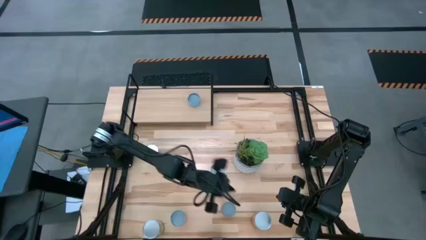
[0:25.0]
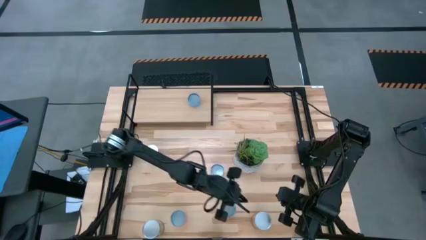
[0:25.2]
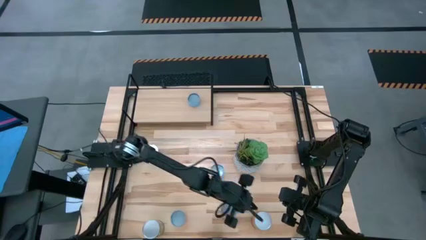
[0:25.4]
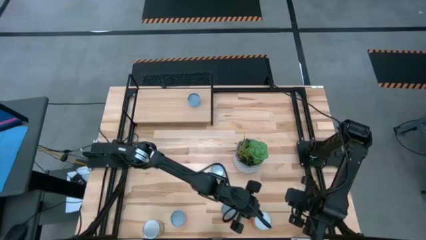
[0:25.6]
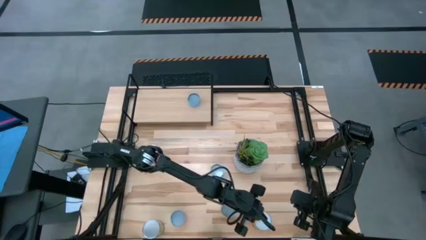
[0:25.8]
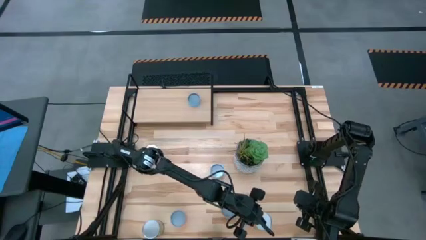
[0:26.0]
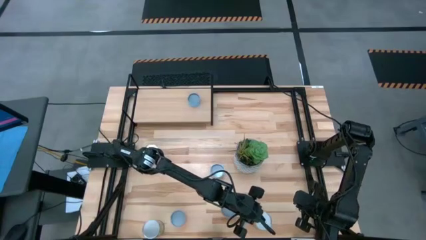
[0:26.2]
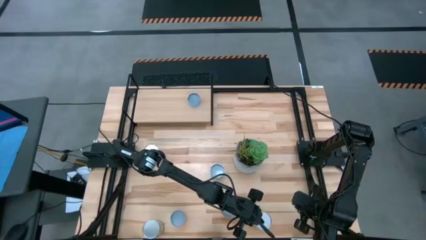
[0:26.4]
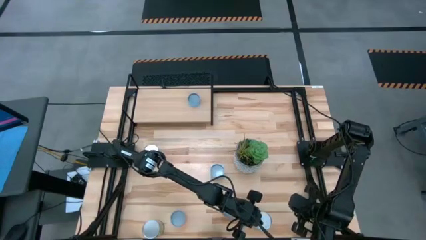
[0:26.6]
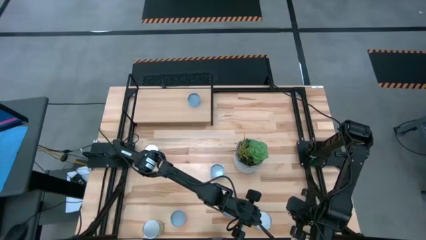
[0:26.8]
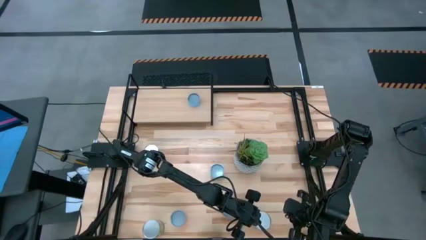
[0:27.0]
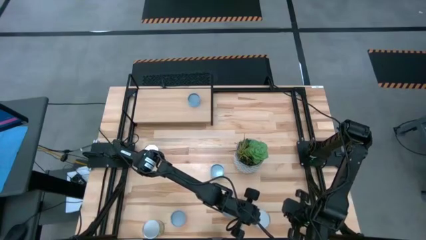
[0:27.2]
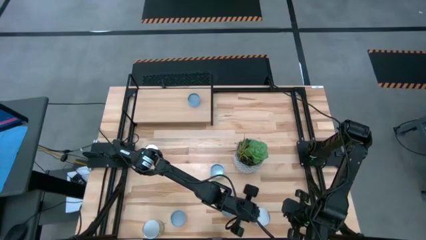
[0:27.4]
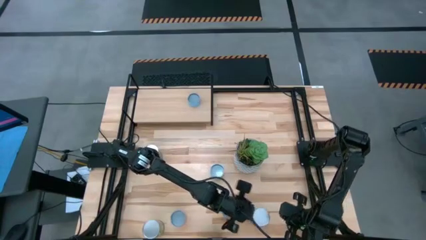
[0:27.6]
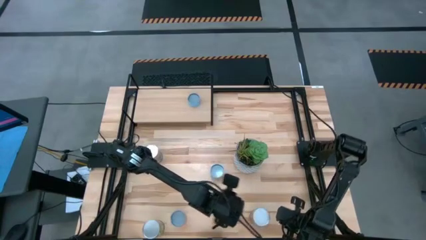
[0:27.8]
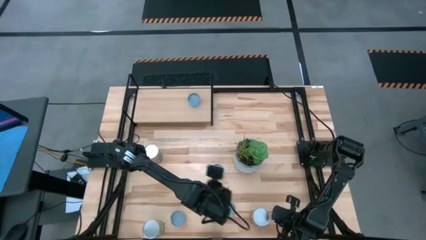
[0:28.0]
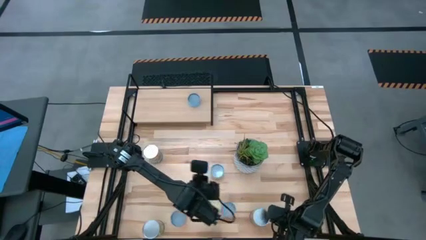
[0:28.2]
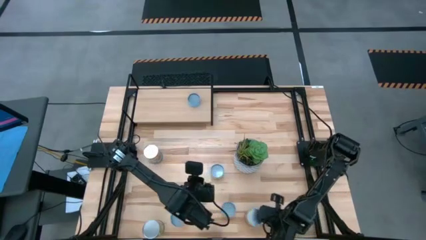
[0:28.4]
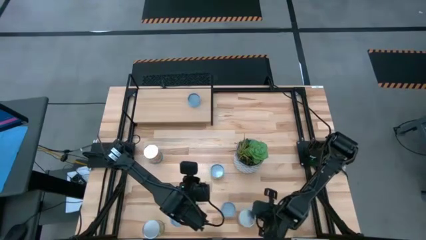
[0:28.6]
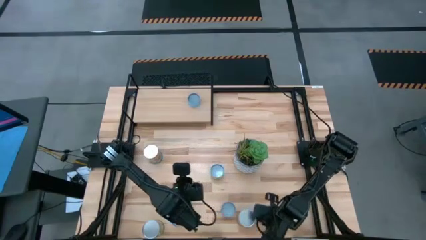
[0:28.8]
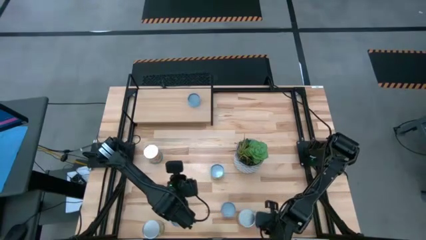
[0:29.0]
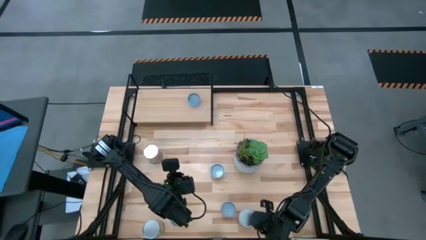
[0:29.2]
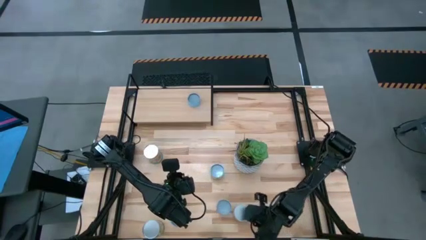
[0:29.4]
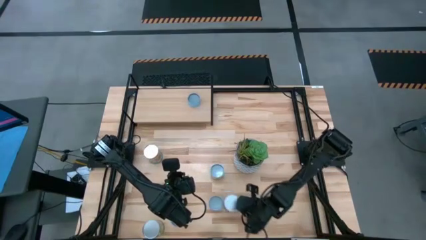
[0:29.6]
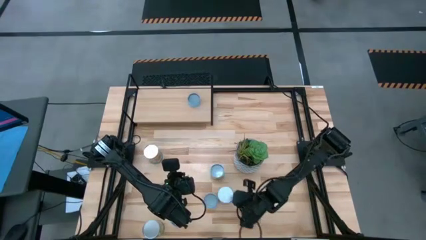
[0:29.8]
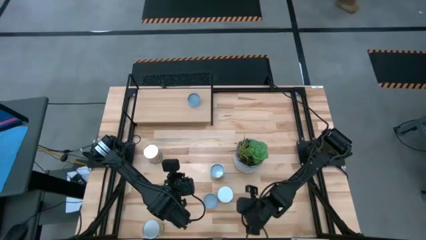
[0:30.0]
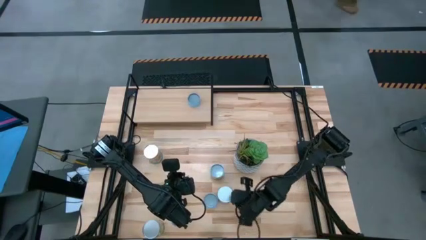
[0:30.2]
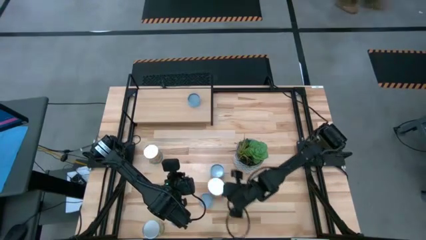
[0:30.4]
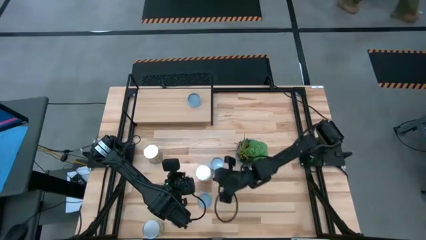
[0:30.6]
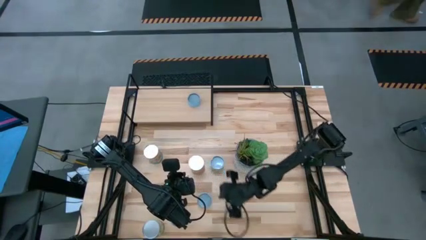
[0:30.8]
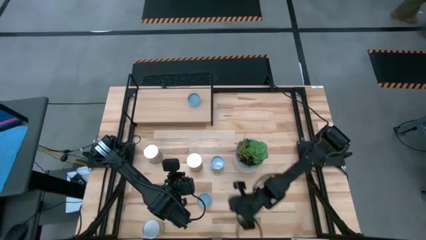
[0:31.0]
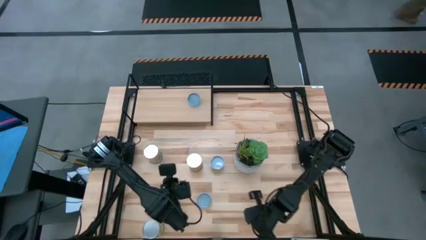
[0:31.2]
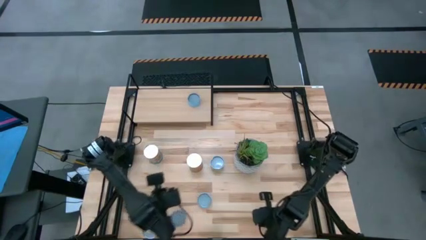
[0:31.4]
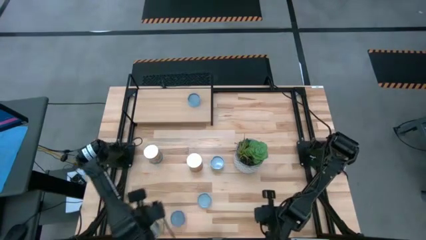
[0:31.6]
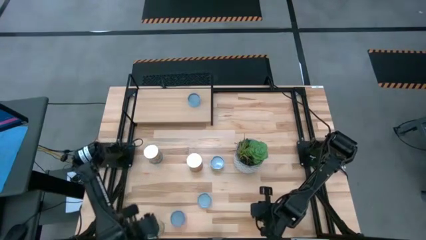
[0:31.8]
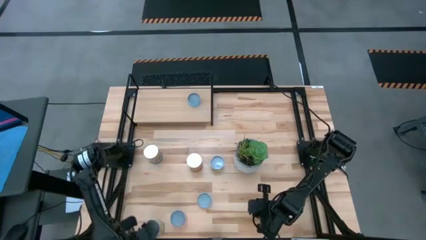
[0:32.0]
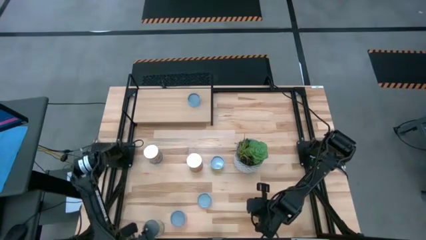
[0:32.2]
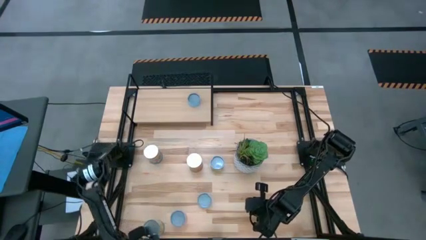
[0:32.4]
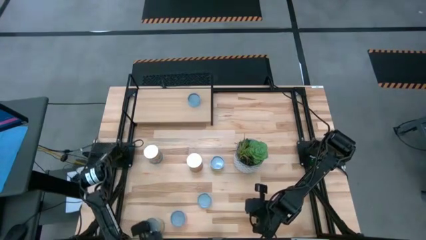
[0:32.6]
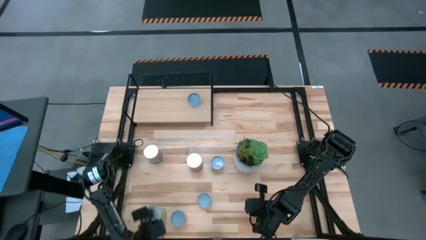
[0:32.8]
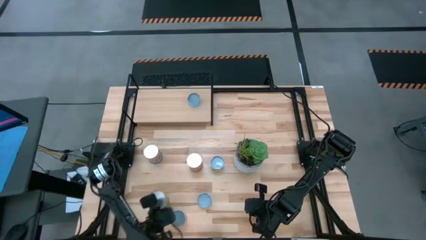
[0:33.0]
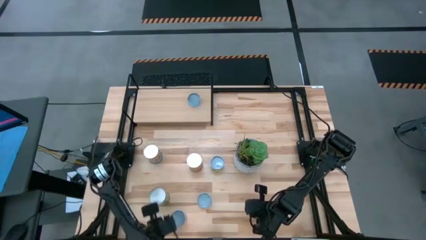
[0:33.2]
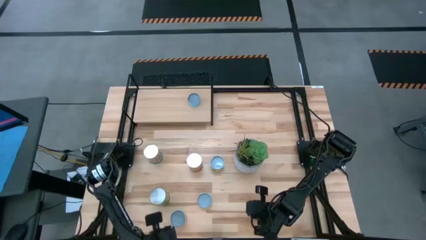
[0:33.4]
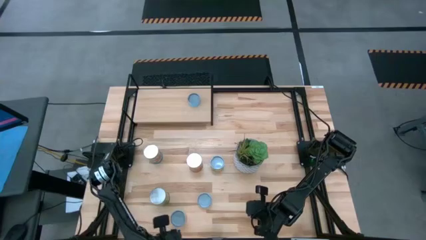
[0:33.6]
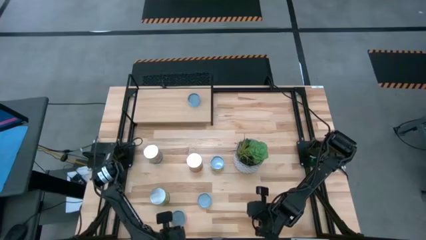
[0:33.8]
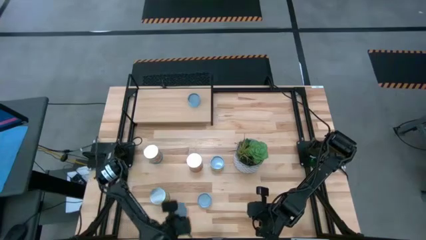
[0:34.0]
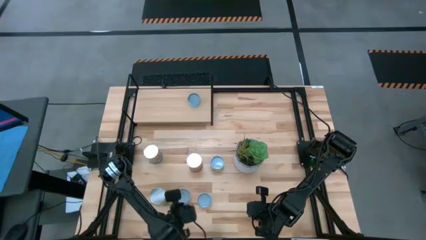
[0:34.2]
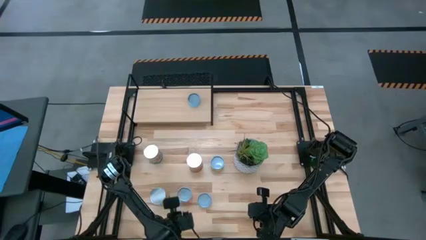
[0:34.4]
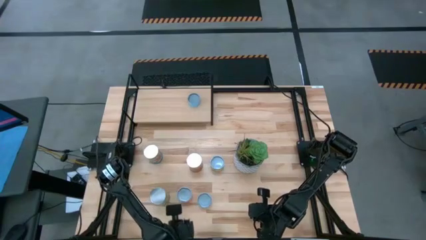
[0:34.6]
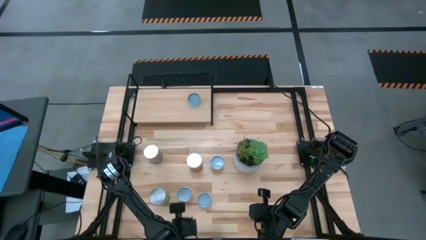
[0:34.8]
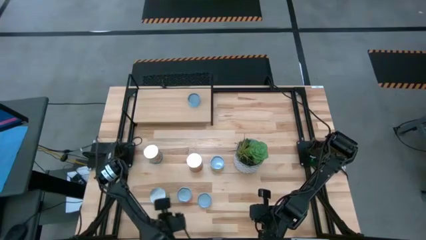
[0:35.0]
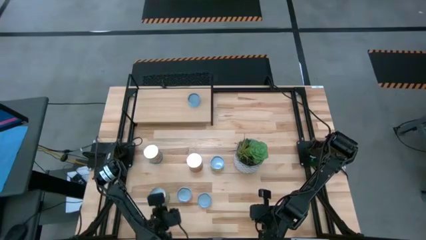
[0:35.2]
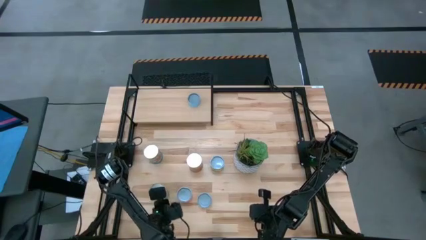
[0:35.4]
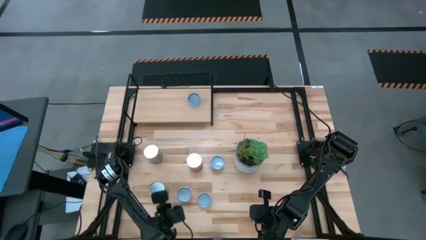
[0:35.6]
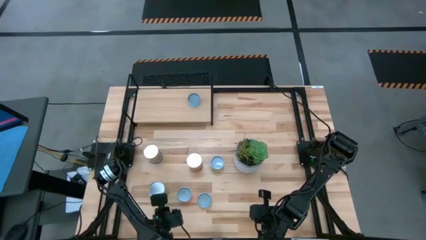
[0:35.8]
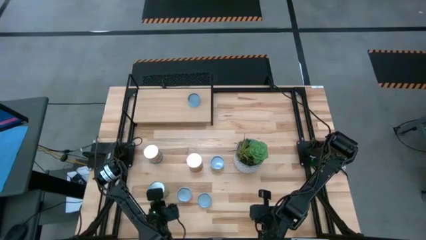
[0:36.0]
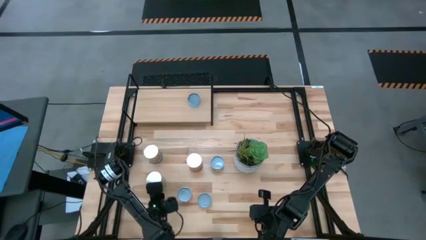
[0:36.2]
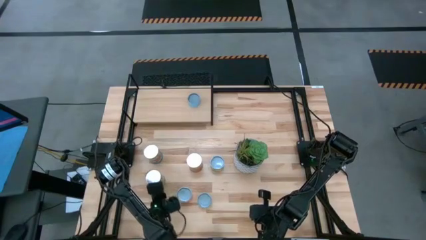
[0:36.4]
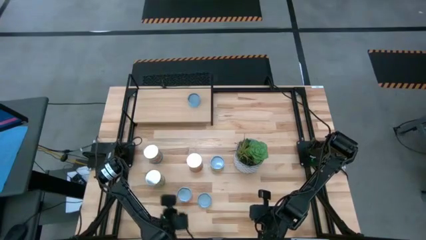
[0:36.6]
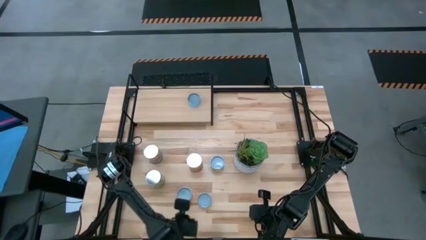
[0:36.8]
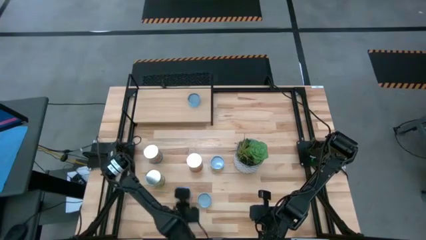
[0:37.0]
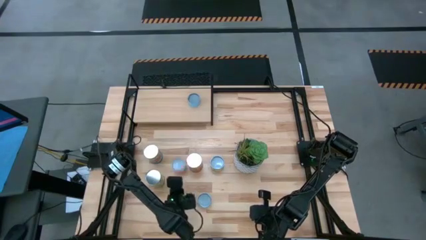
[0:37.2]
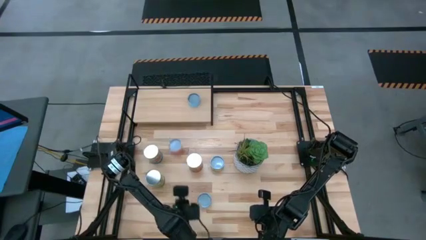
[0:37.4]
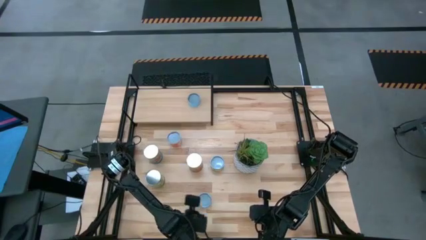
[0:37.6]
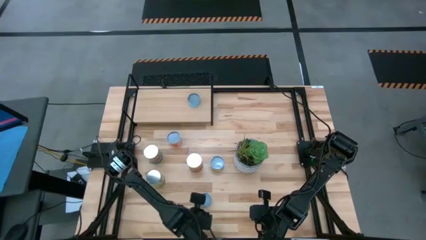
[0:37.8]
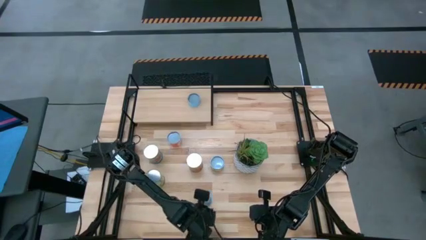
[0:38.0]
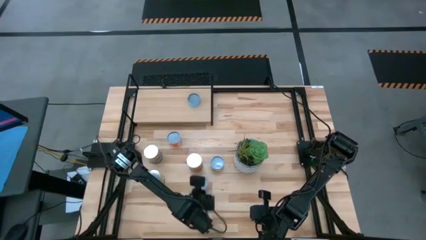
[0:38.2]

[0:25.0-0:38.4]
Task: Pick and place cans onto a shelf
Adjust the canned goods

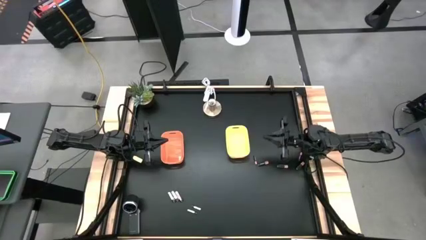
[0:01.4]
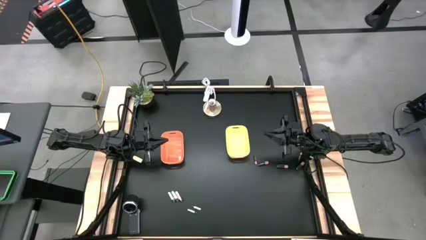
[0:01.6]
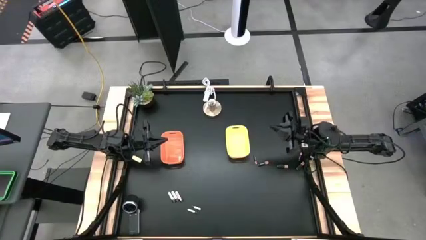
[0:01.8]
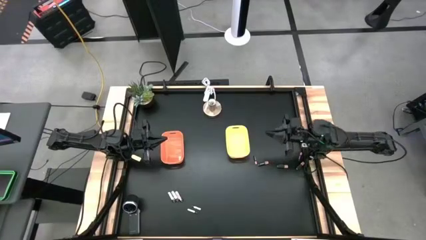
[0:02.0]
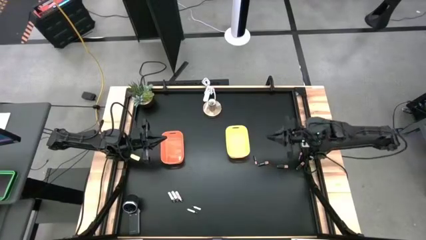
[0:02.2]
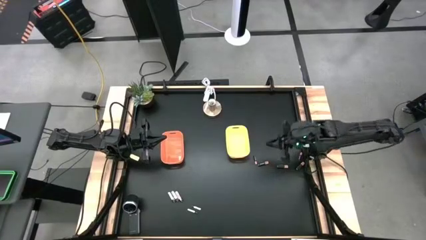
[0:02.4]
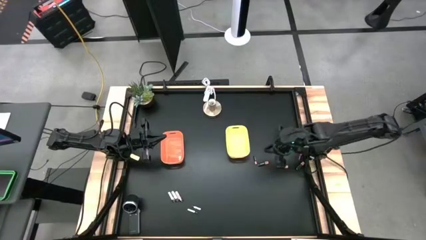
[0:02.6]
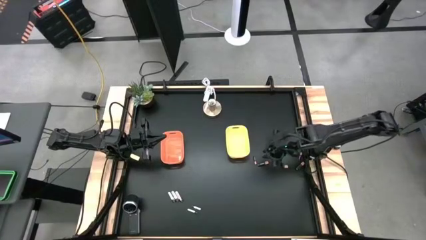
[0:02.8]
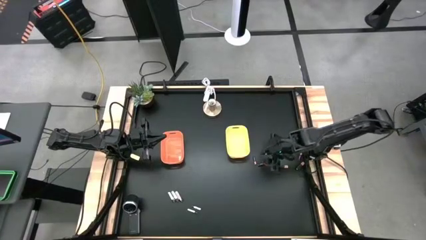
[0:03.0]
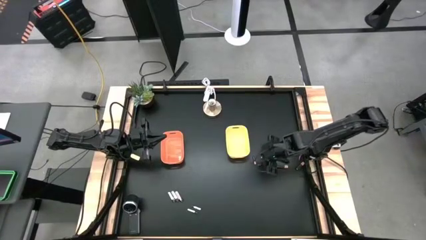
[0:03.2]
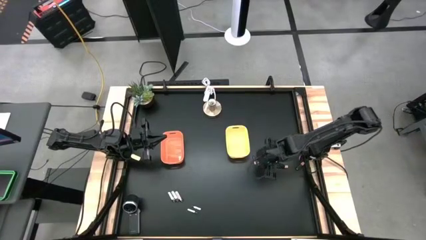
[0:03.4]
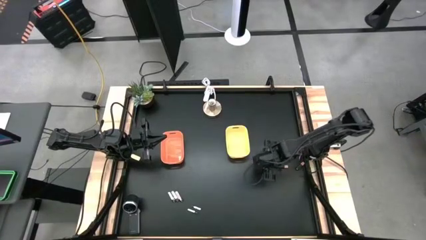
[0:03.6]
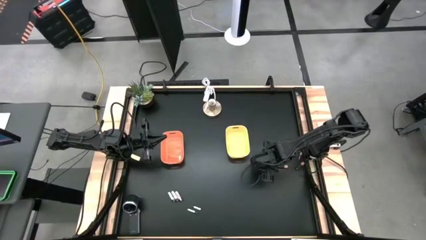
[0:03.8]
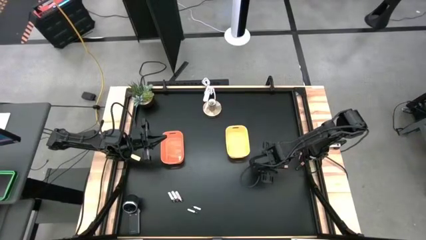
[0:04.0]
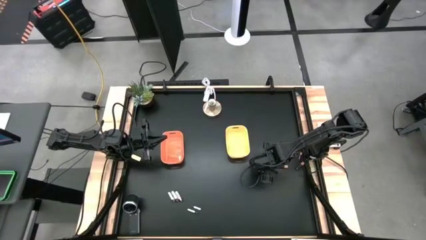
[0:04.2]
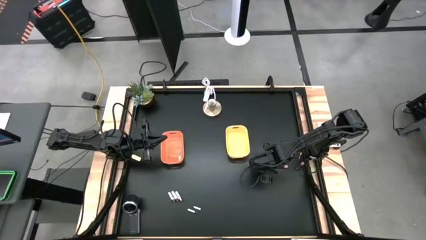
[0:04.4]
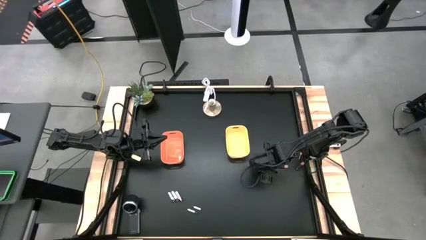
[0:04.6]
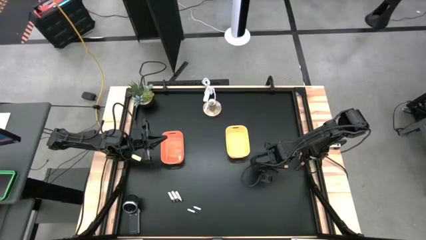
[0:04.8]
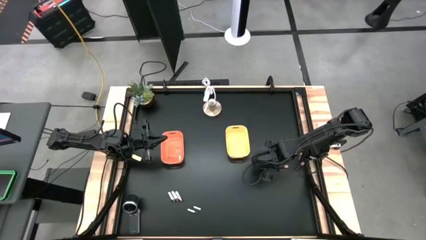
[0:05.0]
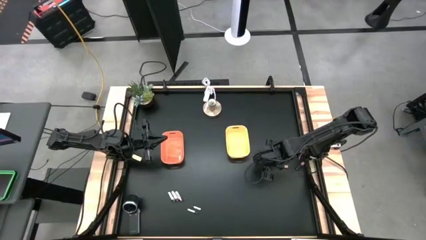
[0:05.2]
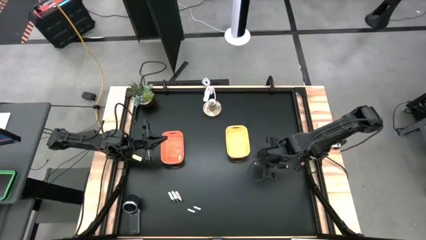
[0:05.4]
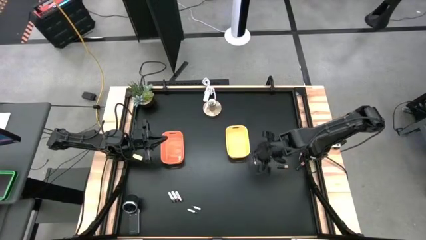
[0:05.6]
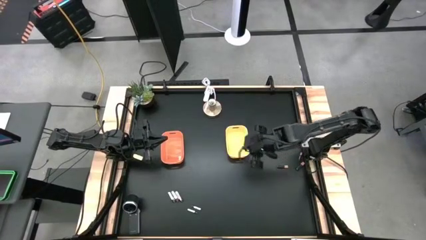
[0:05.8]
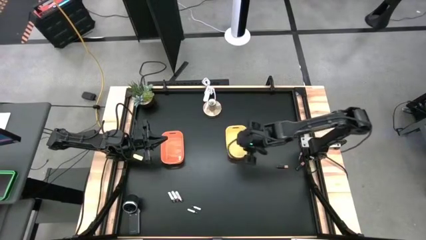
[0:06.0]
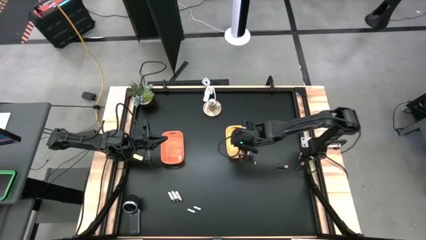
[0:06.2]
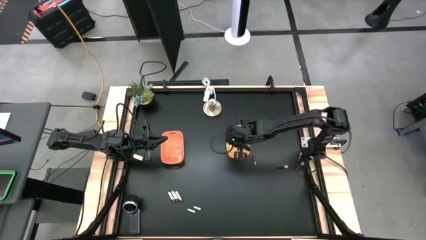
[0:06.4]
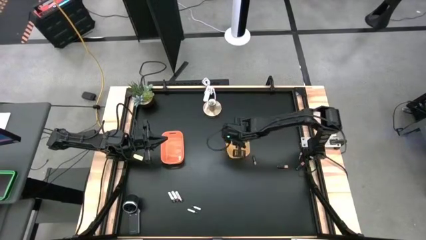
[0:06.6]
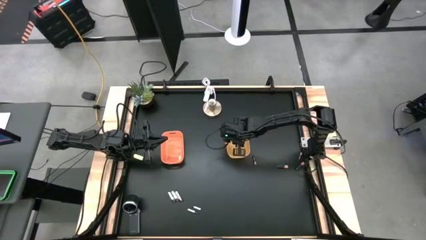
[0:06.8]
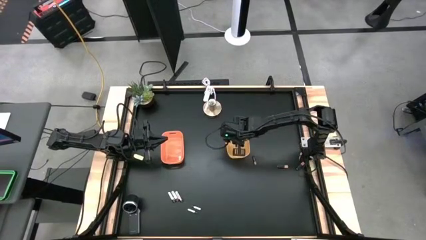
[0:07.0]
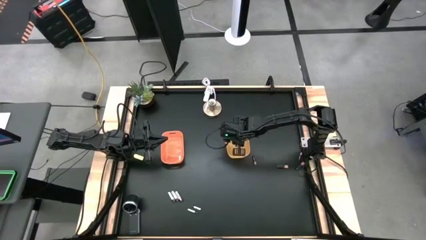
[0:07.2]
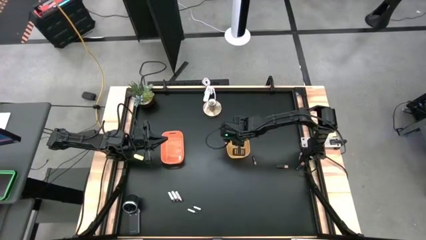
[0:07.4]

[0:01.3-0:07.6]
Task: Sort batteries
Put the black battery into the yellow bin
